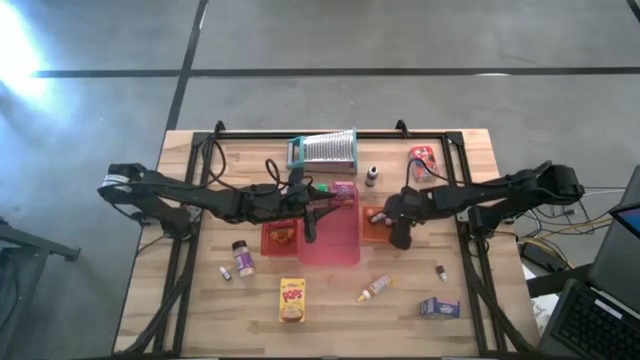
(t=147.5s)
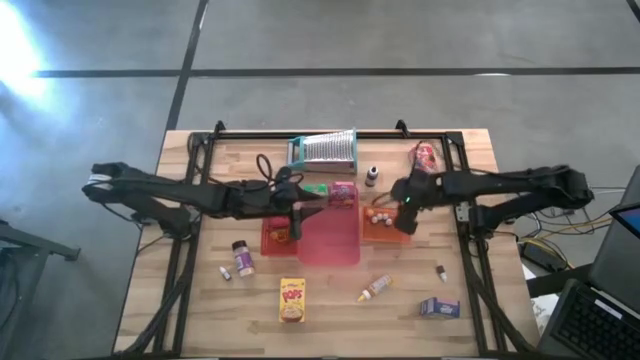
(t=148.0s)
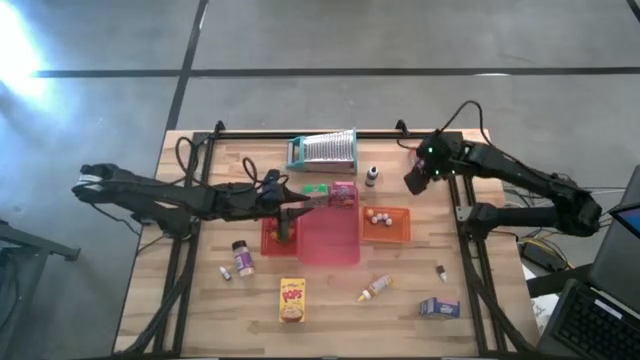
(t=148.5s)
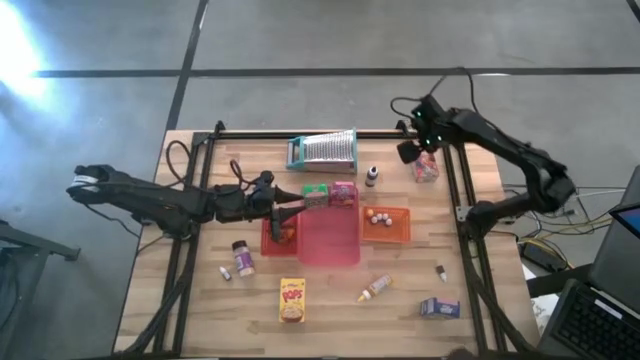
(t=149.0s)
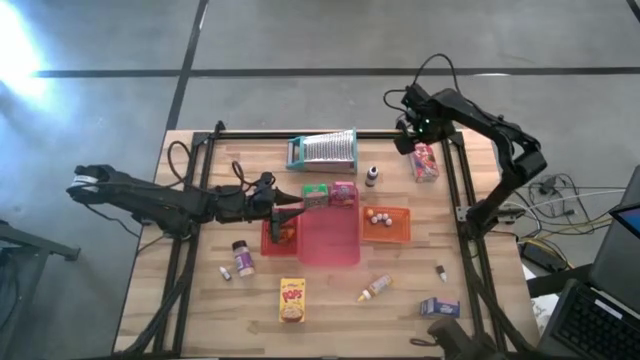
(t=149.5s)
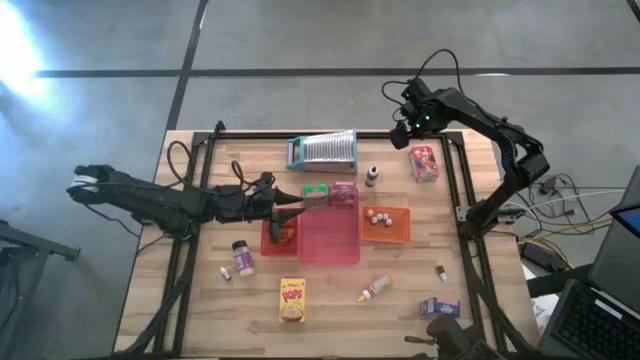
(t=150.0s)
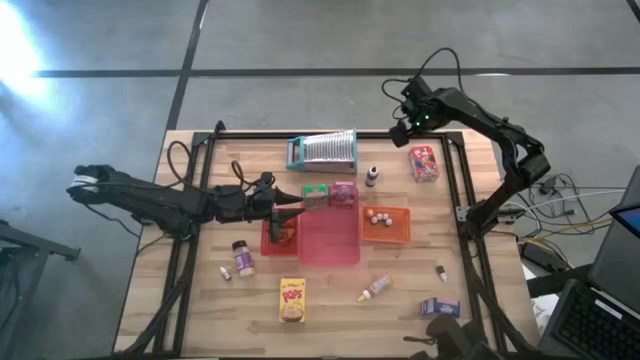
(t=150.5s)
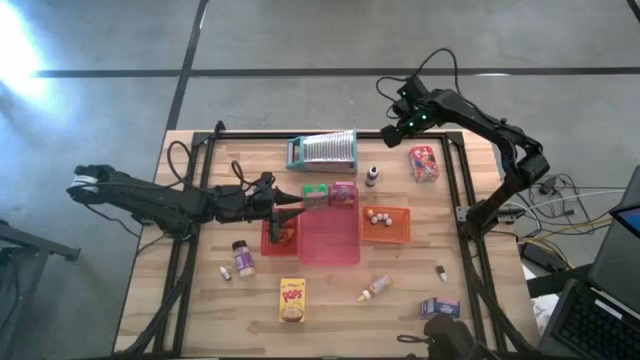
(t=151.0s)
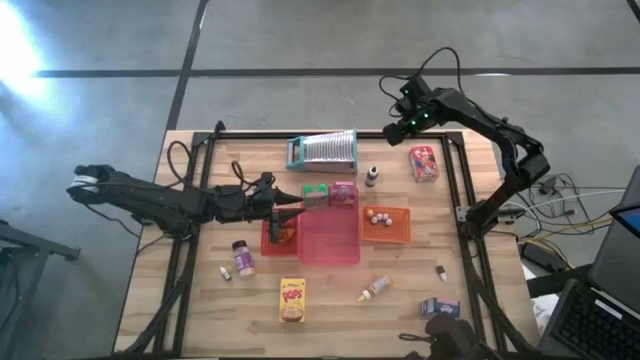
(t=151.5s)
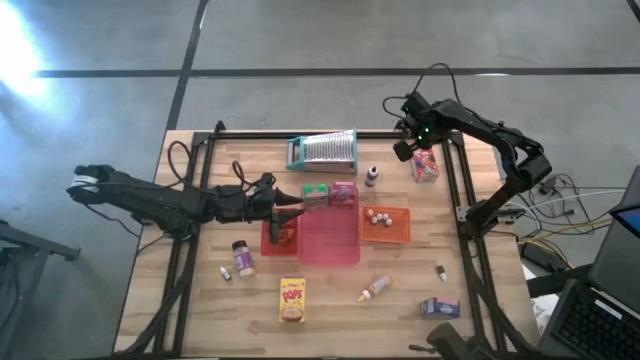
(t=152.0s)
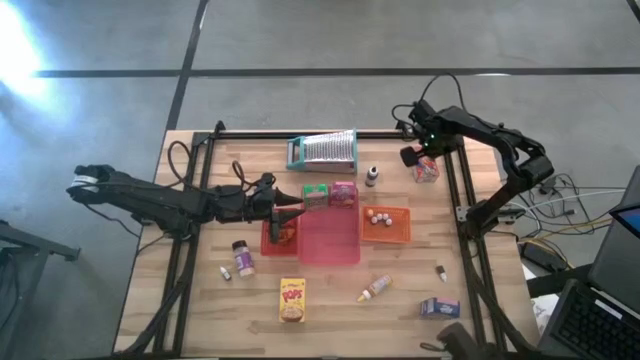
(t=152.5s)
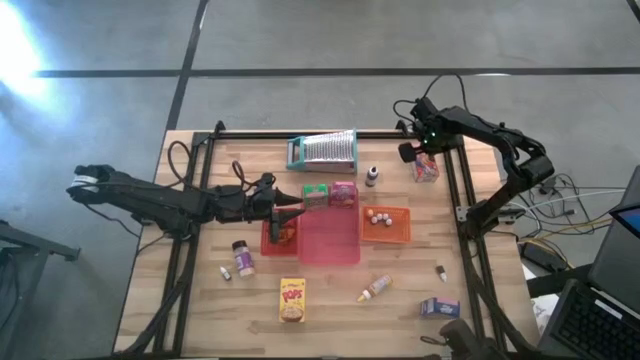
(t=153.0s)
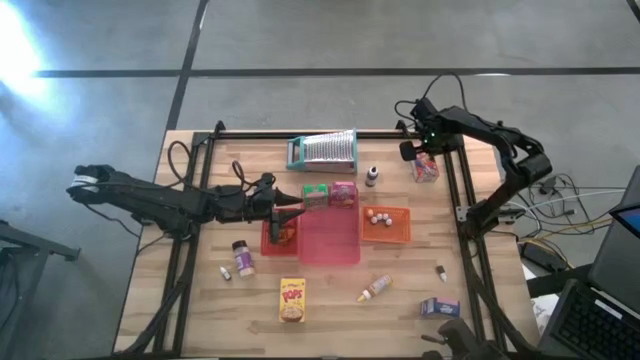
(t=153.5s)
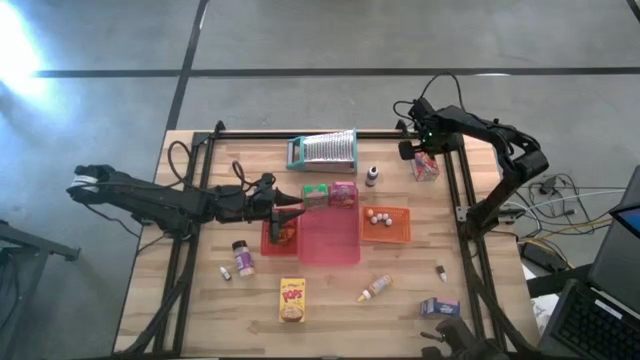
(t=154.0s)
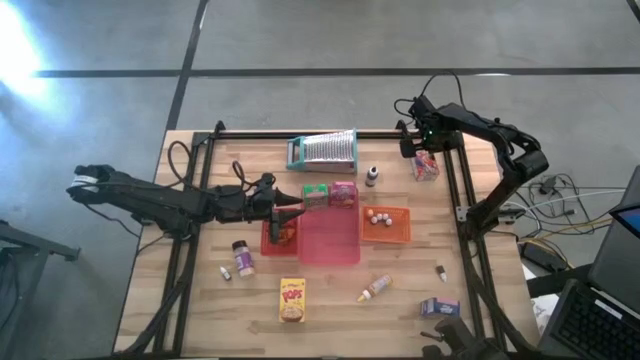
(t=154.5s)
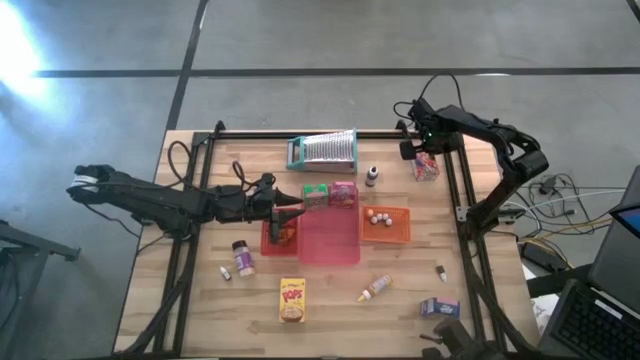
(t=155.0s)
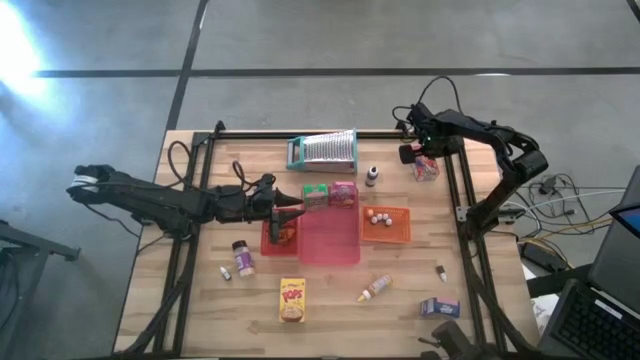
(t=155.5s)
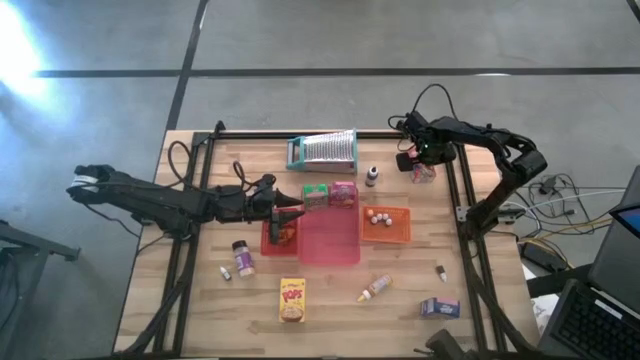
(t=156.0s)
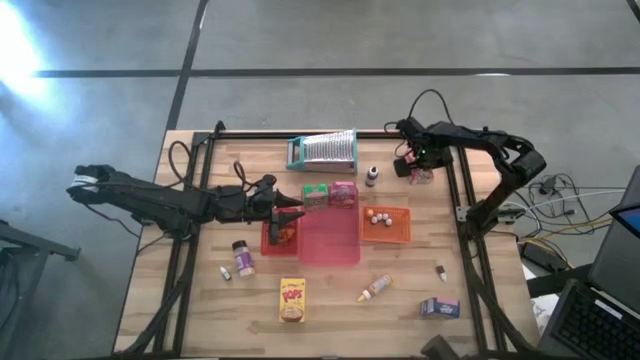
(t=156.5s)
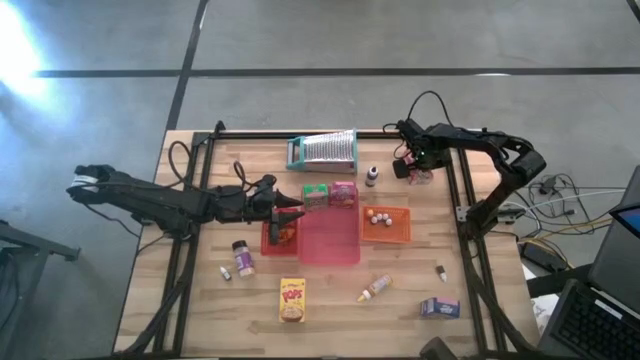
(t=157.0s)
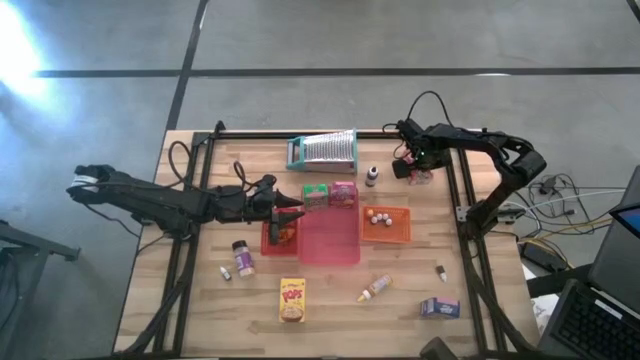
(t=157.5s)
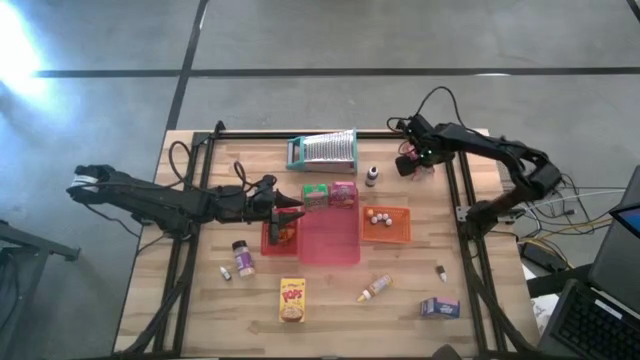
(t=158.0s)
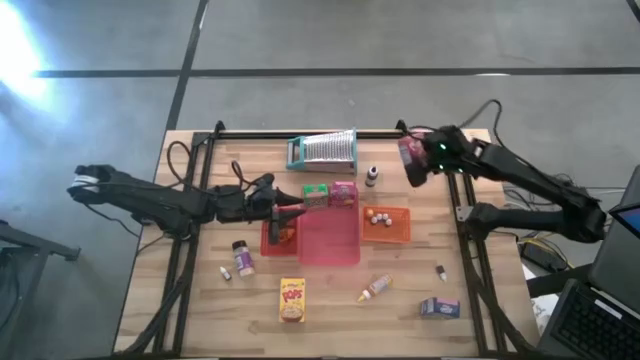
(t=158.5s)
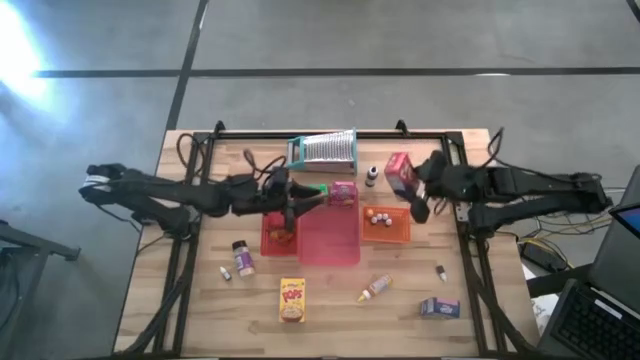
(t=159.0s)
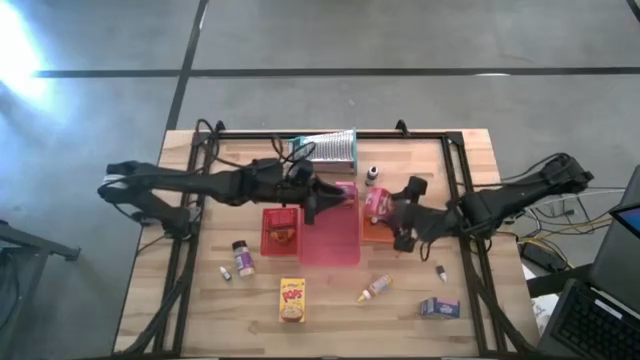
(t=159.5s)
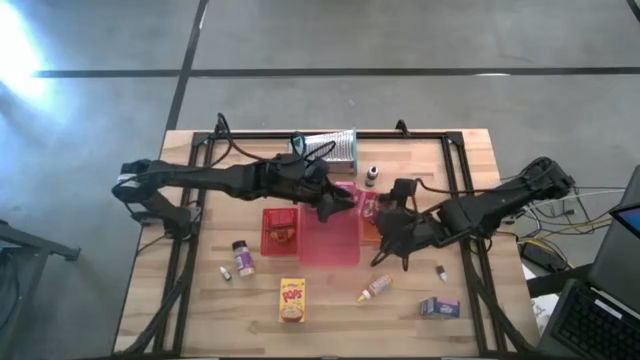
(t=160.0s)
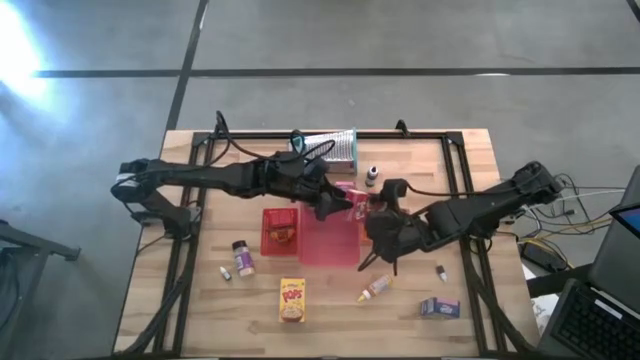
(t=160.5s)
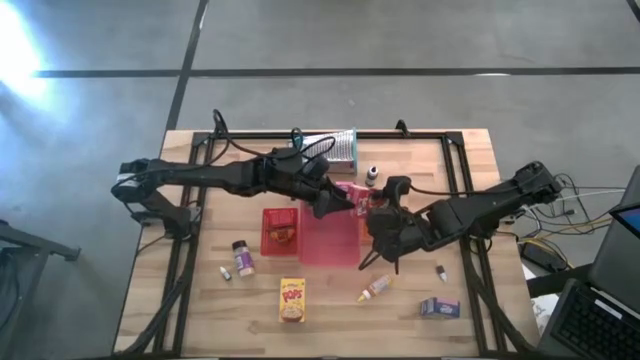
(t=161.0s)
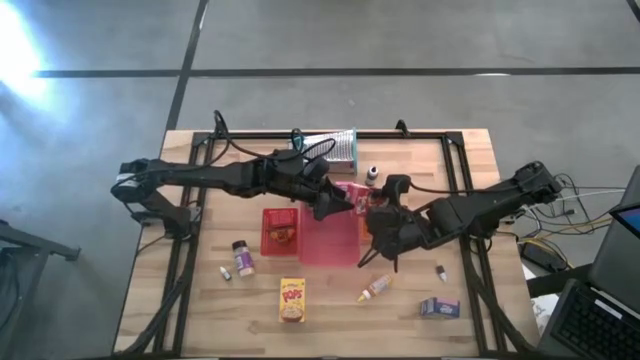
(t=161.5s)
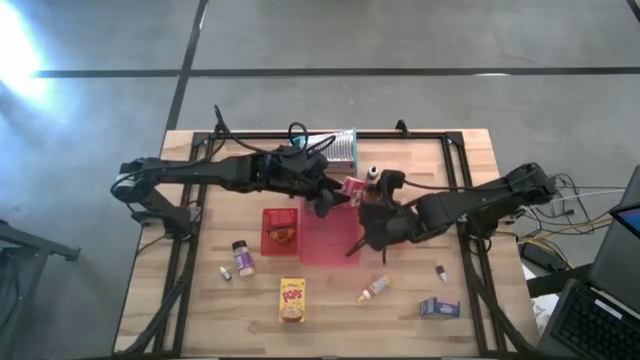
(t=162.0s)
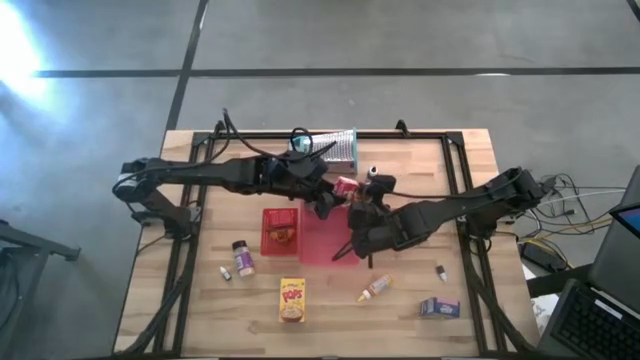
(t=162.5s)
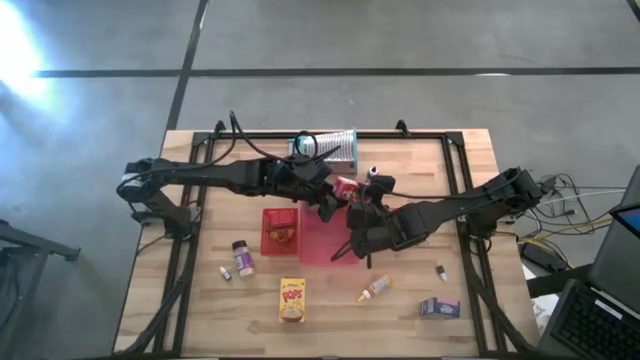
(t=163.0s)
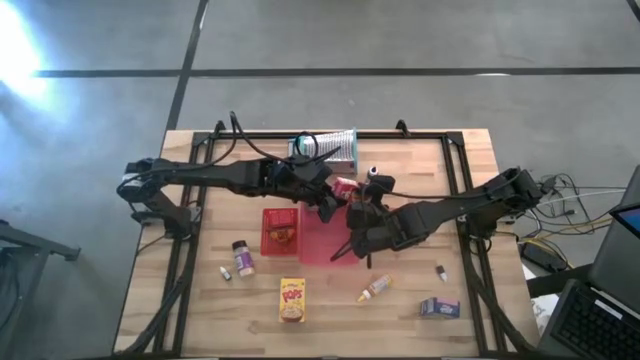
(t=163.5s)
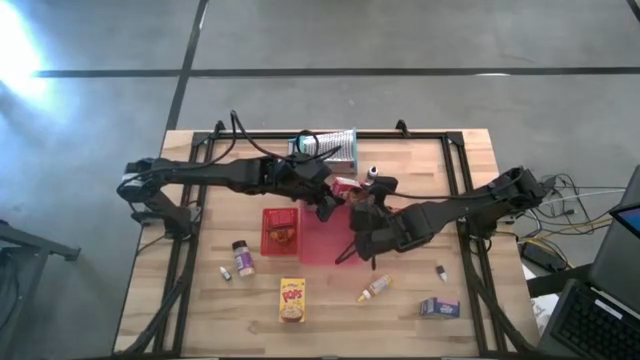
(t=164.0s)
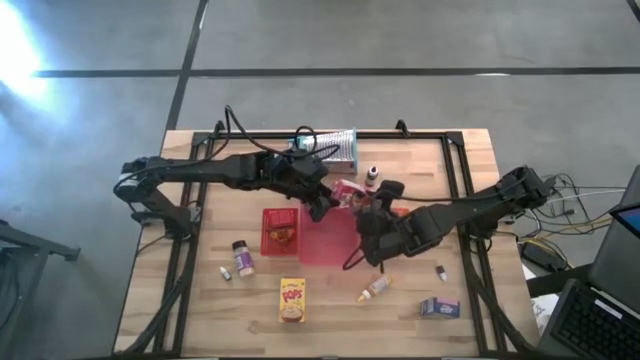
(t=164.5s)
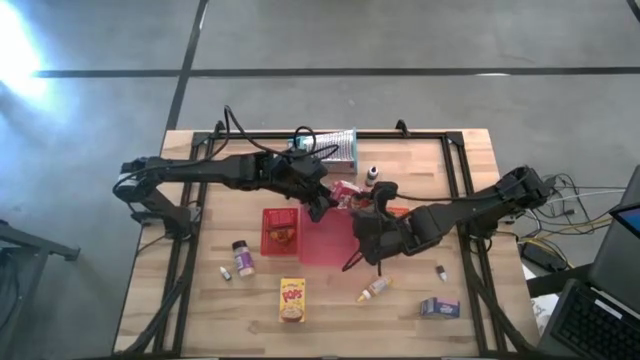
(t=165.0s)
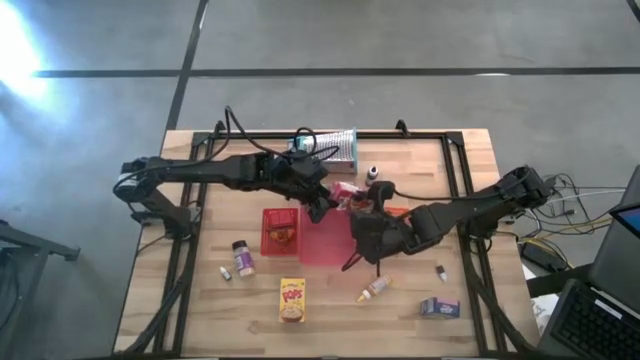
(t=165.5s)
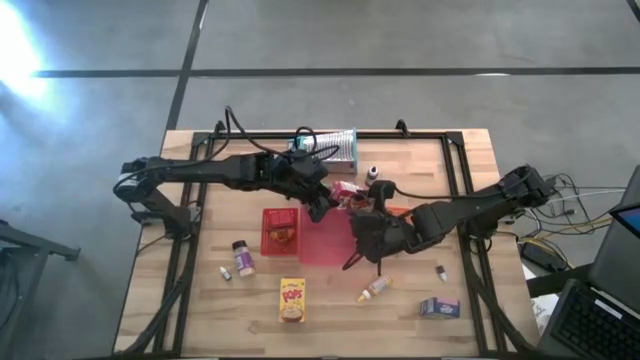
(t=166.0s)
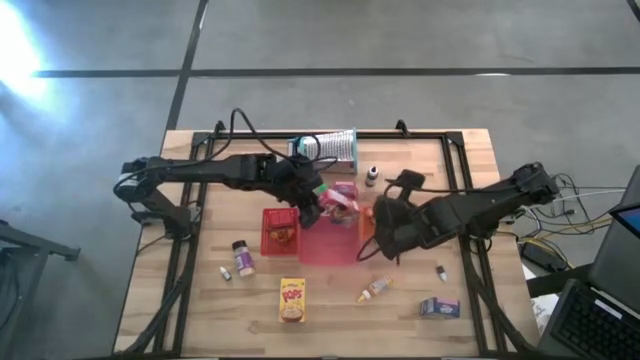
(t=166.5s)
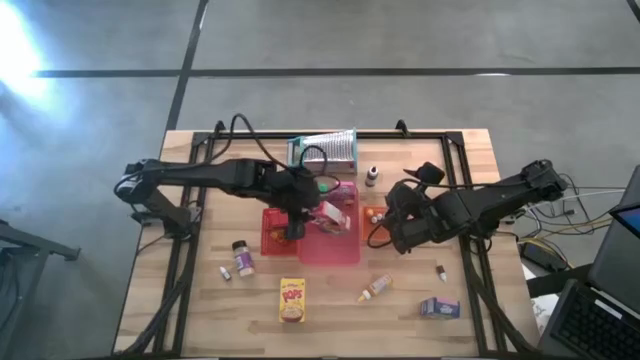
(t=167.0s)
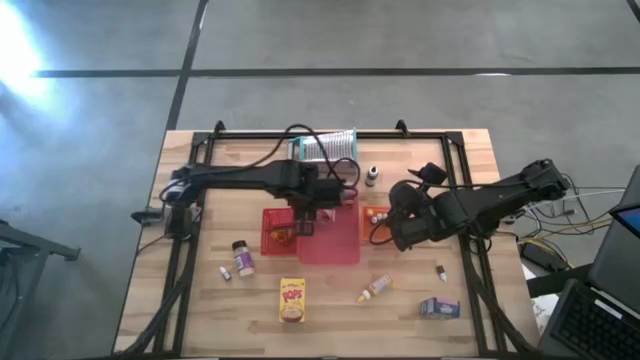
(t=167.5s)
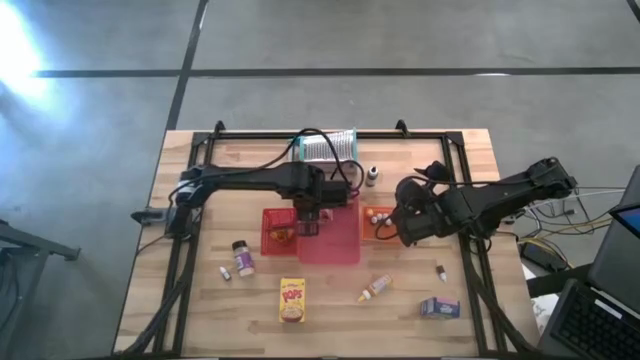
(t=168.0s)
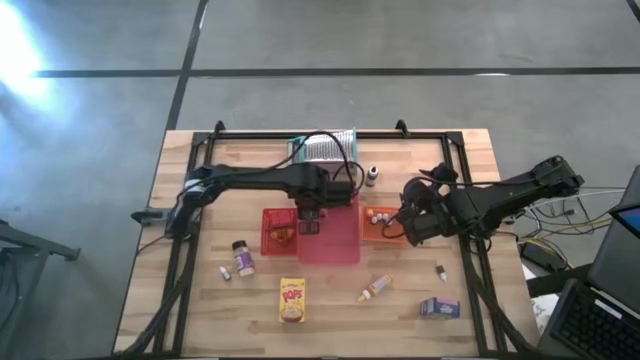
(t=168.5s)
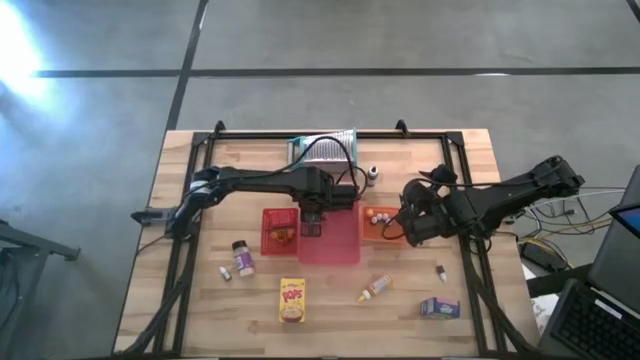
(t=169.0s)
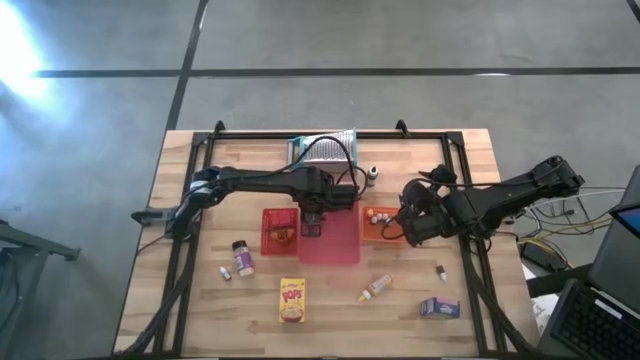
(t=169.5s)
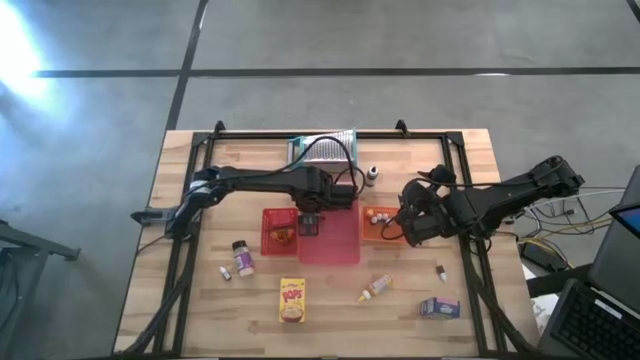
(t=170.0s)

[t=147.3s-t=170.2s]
Task: Pick & Place Kitchen Items
Put the red cereal box into the pink bin
